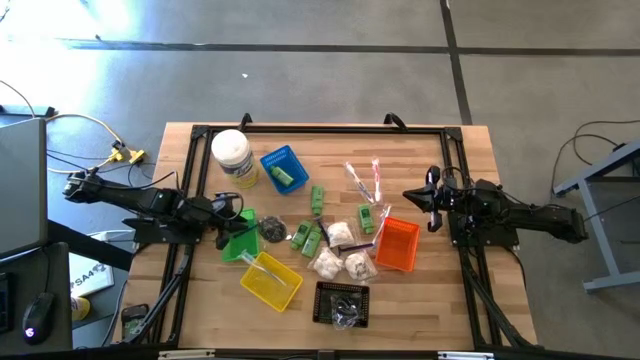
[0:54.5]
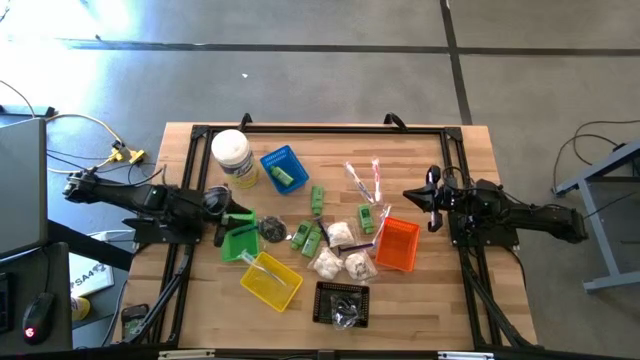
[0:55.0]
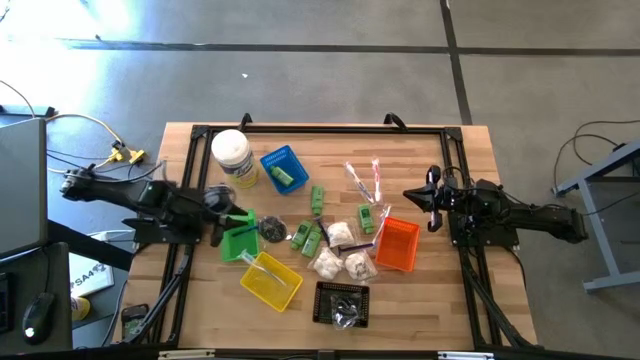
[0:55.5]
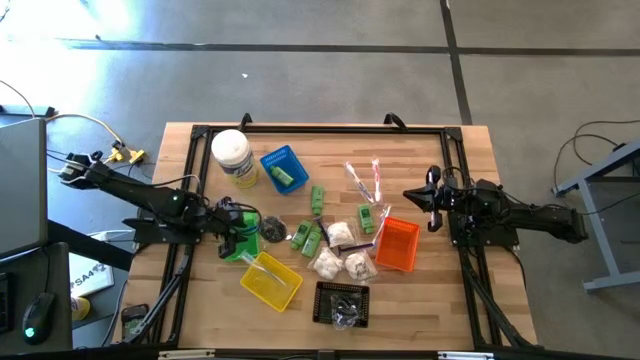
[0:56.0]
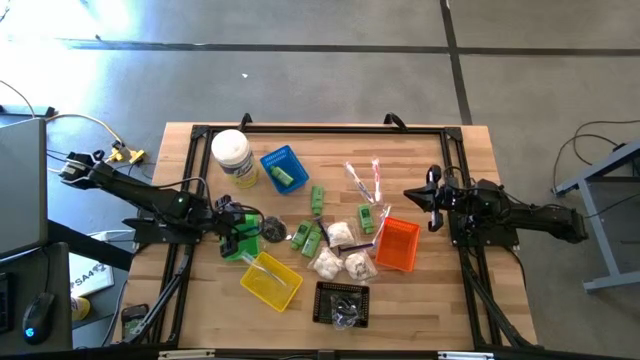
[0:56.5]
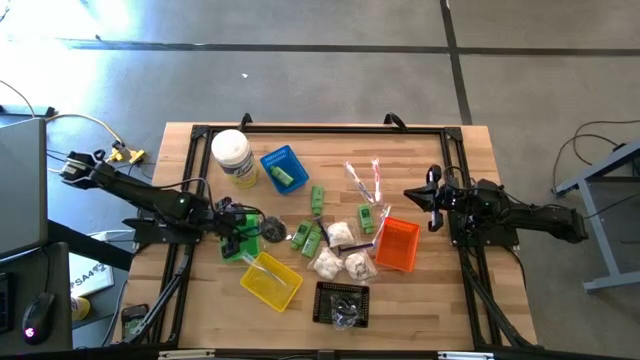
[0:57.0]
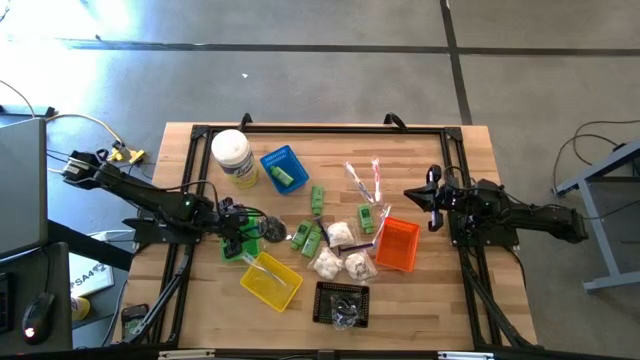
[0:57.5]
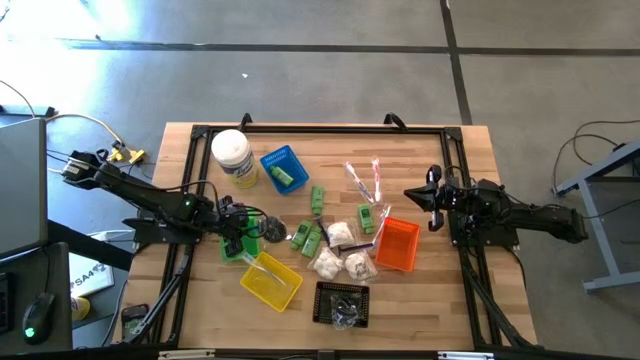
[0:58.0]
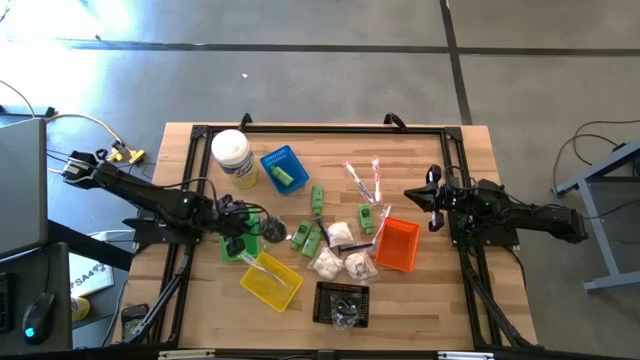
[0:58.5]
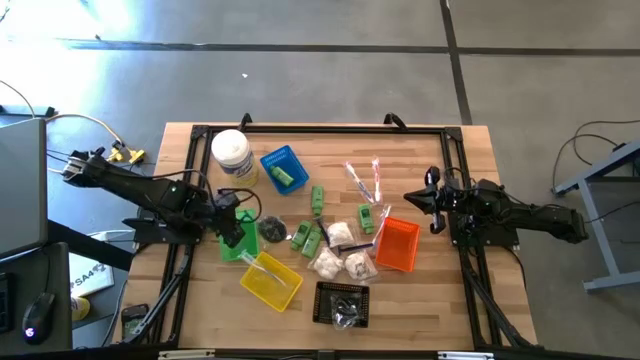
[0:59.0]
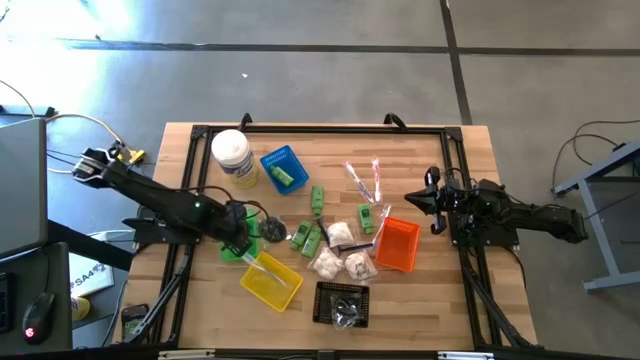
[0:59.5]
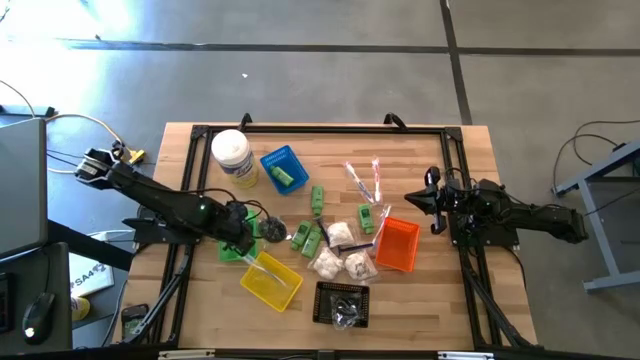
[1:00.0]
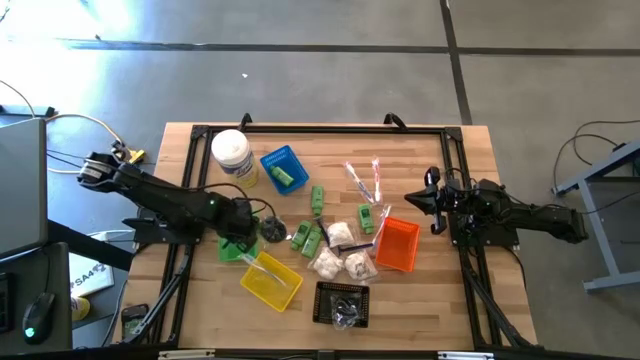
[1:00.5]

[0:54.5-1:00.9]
Task: Pick & Place Travel size toiletries
Put the blue razor into the green bin

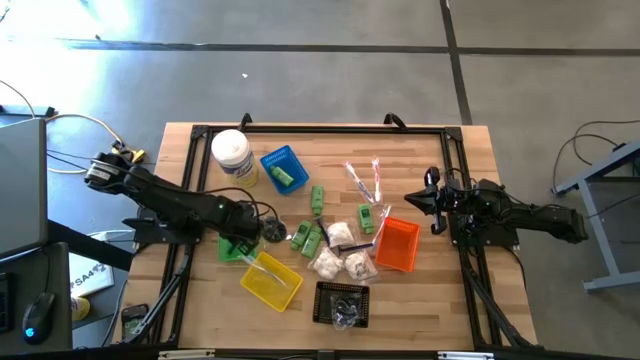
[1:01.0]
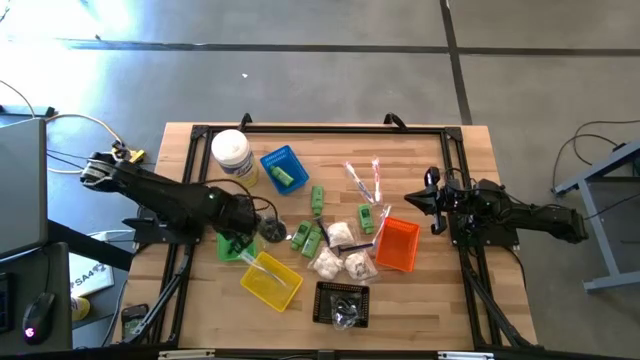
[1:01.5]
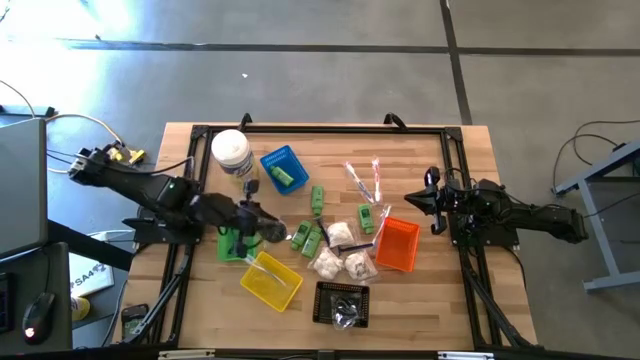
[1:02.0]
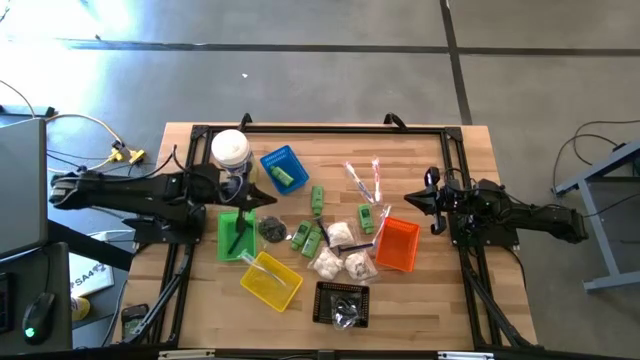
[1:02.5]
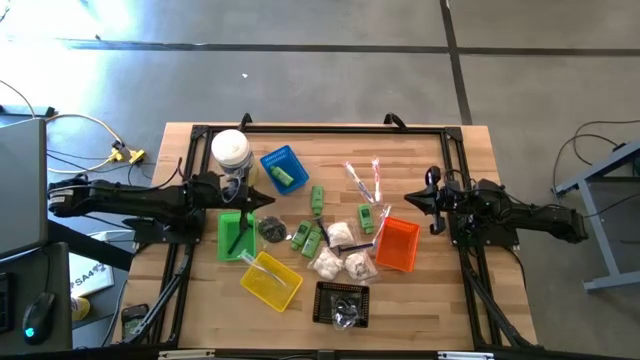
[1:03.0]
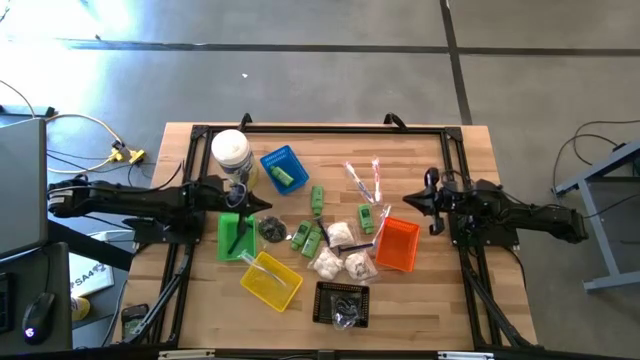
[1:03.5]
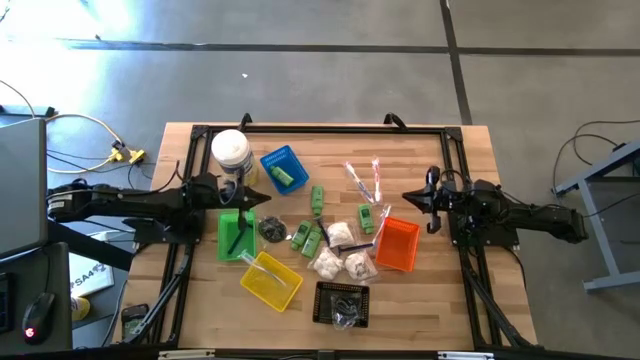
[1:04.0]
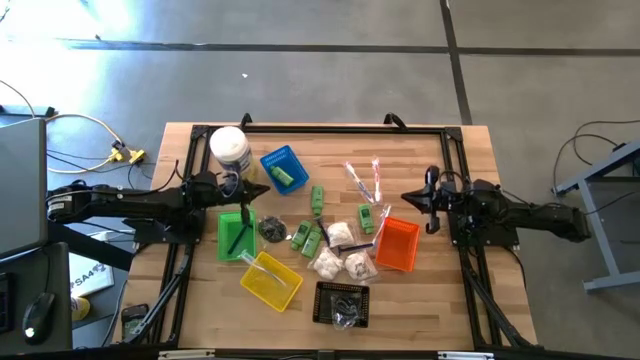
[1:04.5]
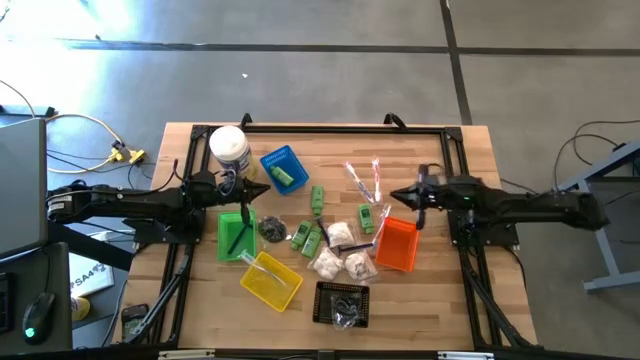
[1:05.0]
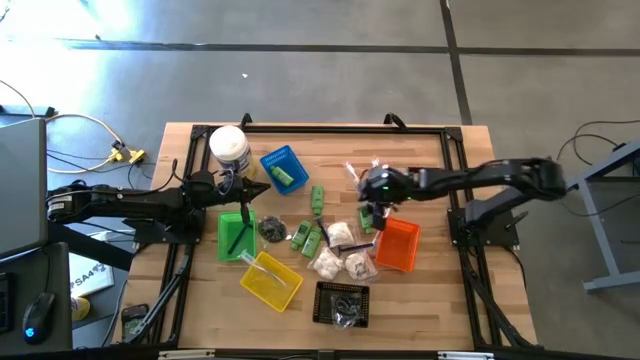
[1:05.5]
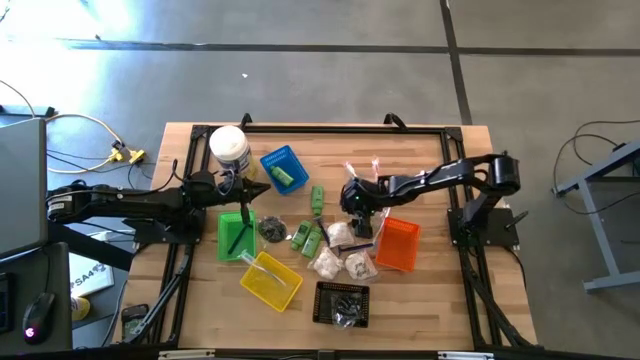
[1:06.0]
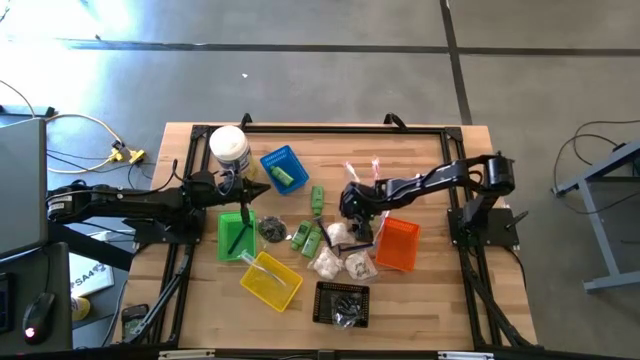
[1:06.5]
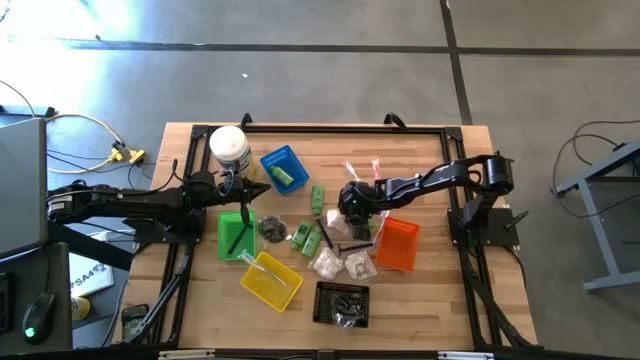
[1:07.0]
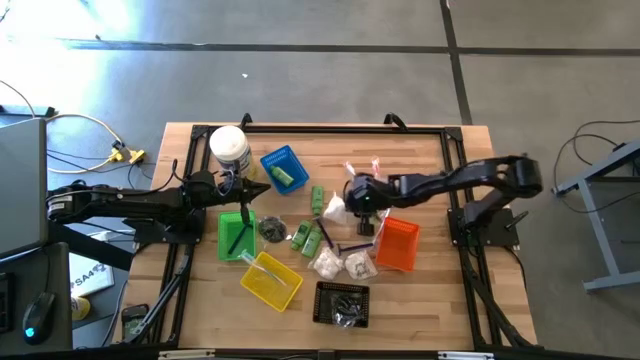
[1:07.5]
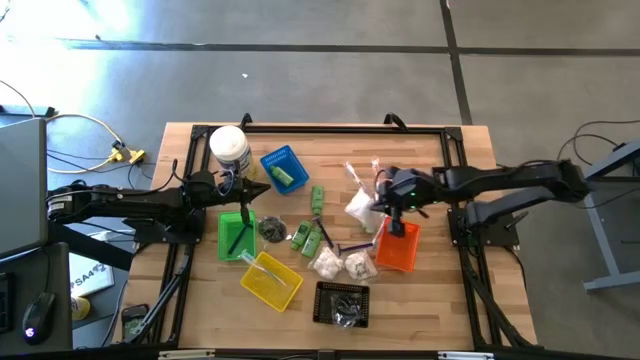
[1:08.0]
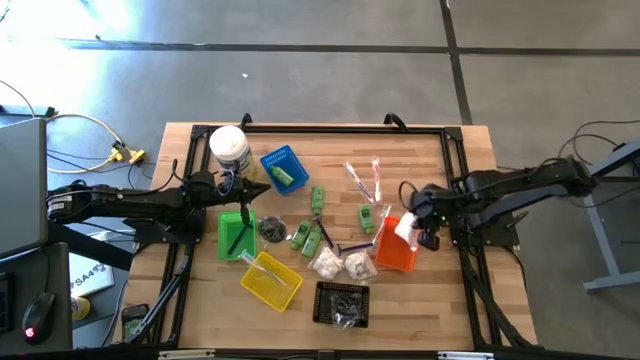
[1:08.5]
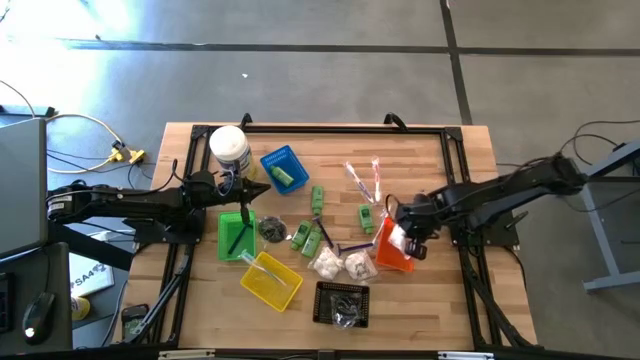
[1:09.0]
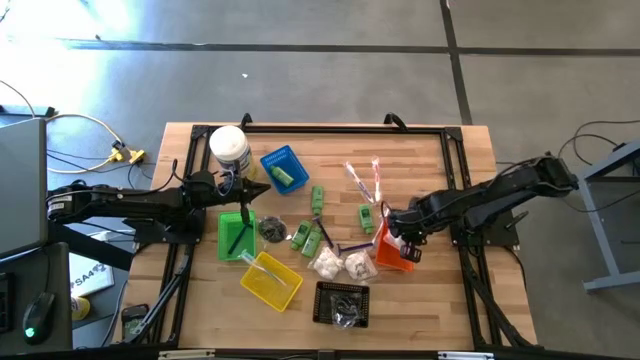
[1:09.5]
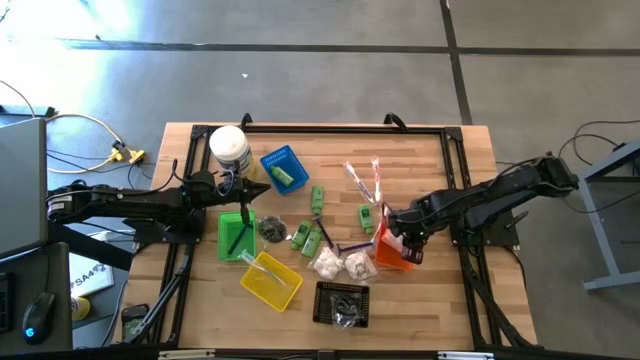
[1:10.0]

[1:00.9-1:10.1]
Put the white cotton pack into the orange bin

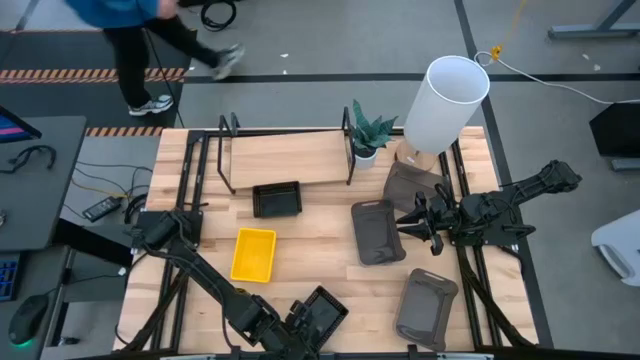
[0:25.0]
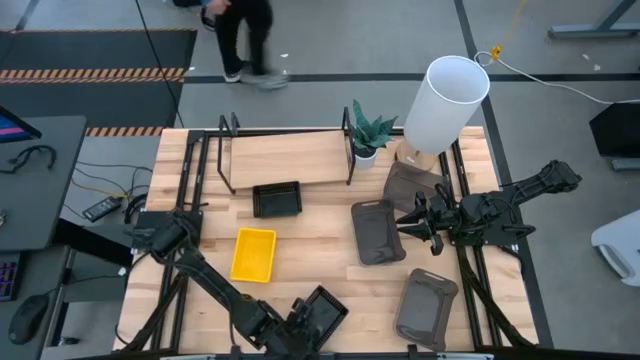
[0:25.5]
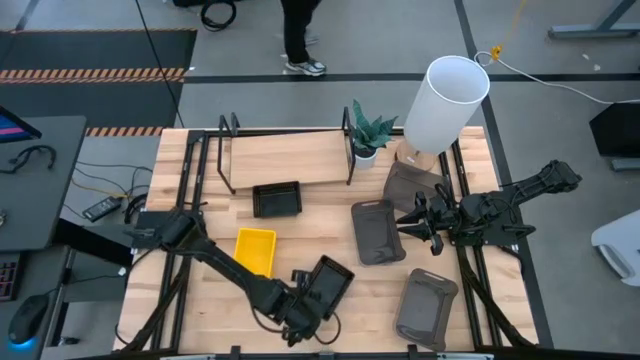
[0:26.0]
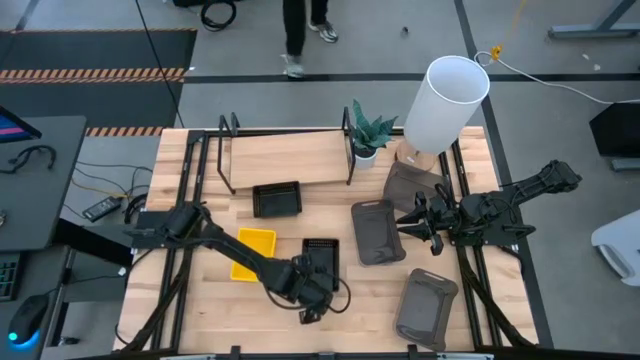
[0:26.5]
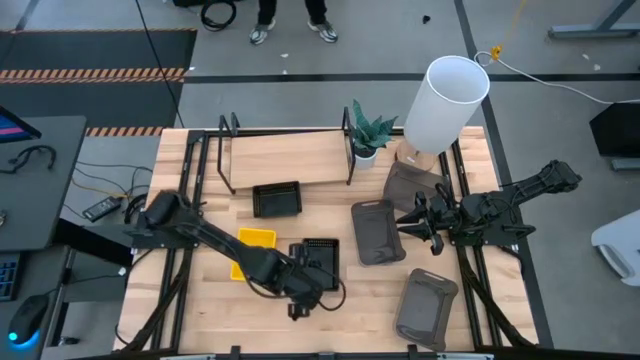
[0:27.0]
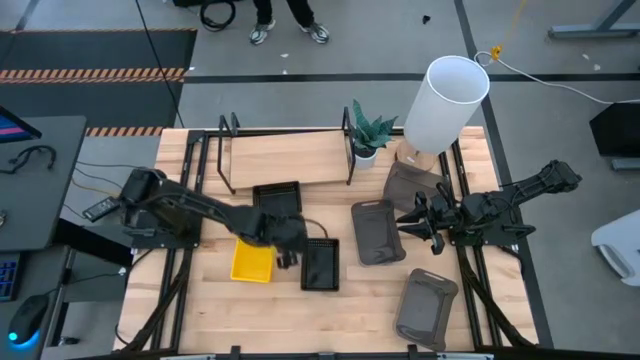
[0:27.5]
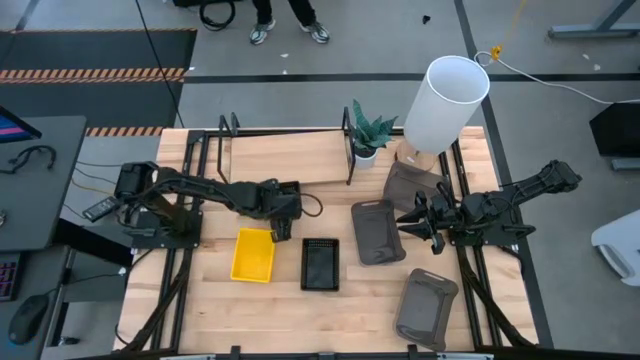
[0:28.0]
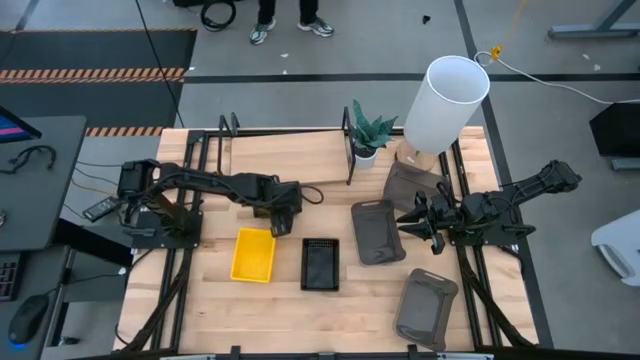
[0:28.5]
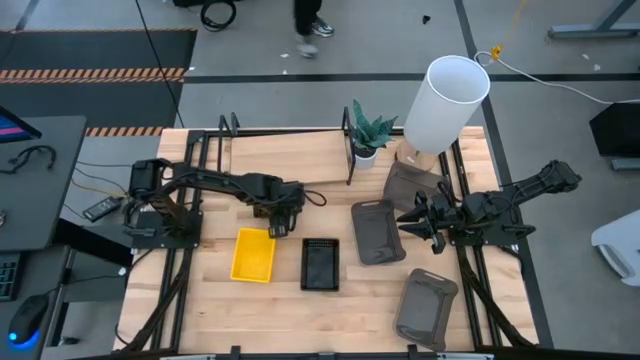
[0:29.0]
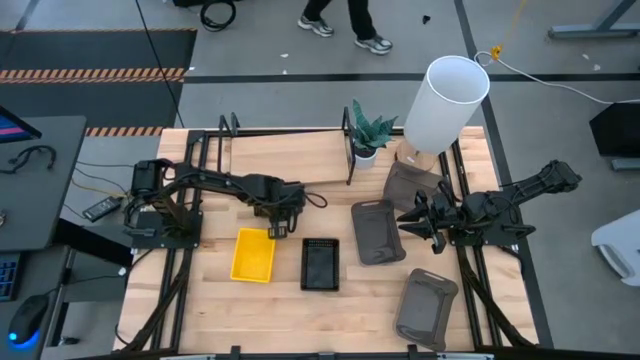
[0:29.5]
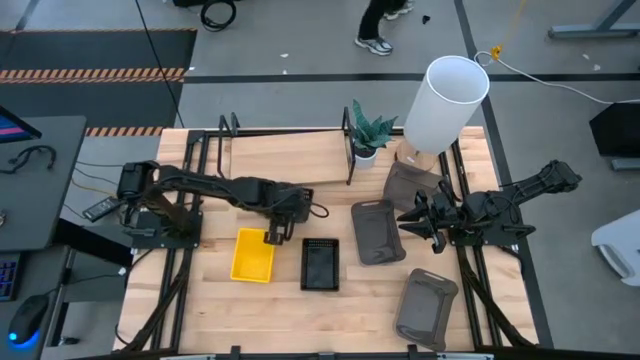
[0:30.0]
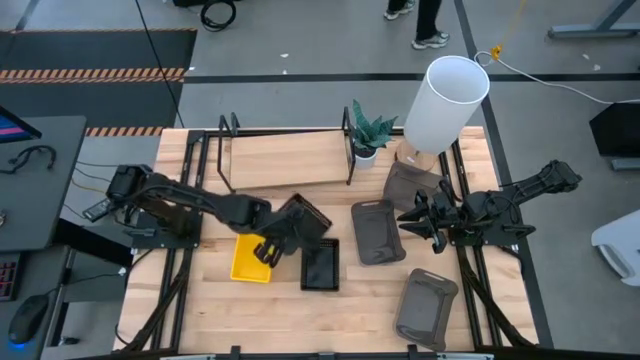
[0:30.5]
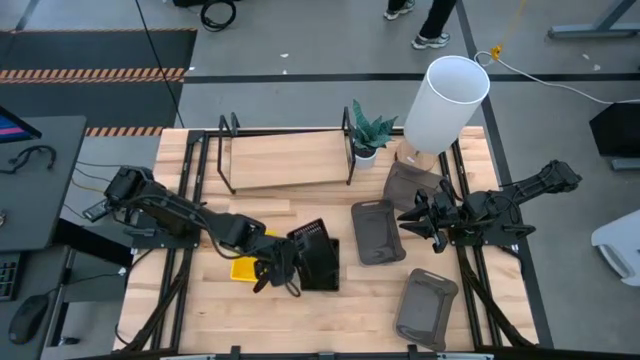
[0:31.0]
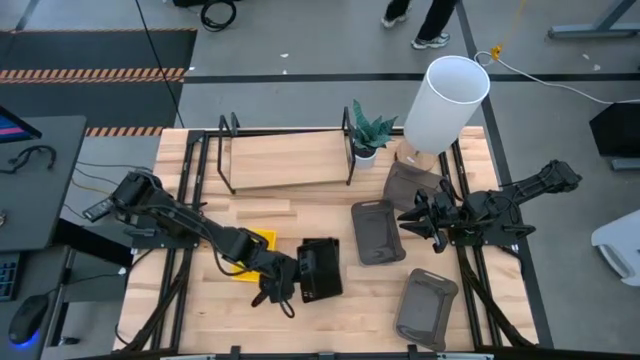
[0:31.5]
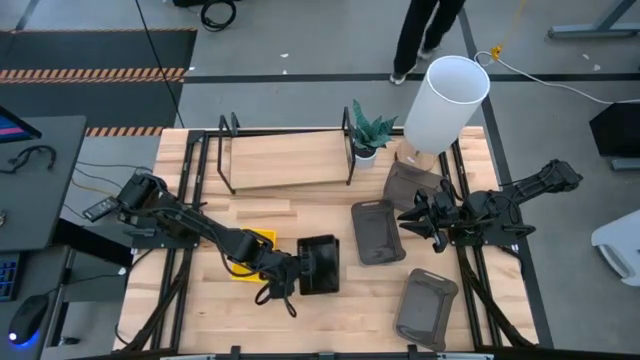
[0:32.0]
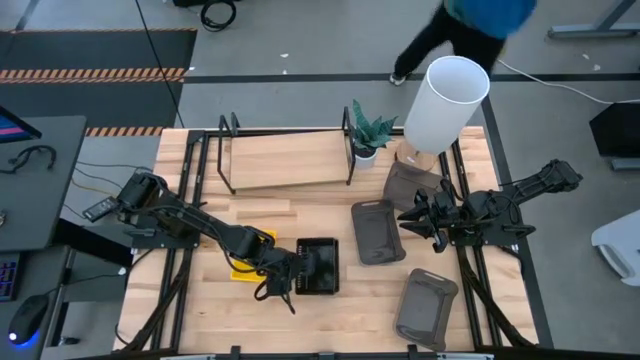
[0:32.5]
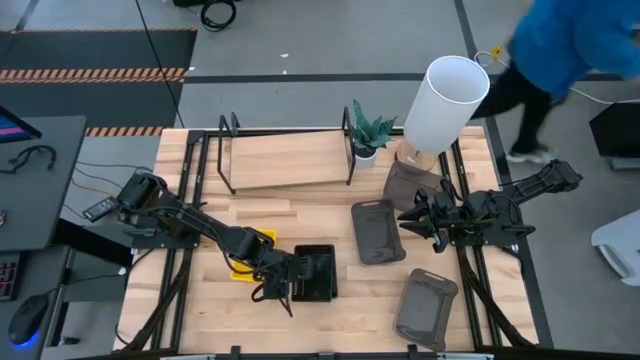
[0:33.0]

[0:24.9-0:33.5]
Task: Stack baskets on shelf by color
Put the top black bin on the bottom black bins
